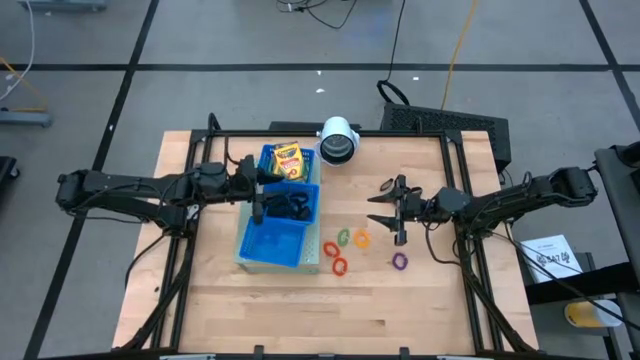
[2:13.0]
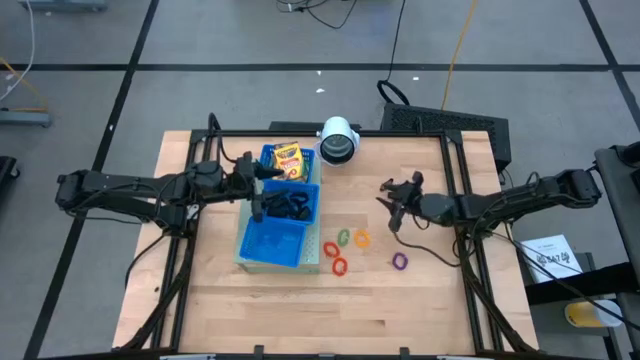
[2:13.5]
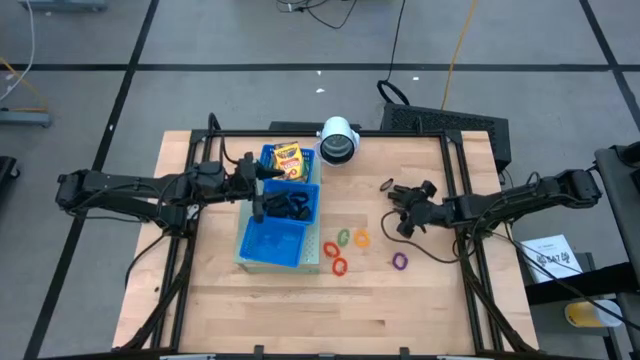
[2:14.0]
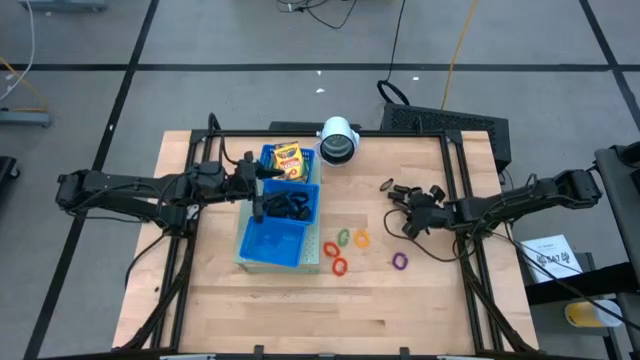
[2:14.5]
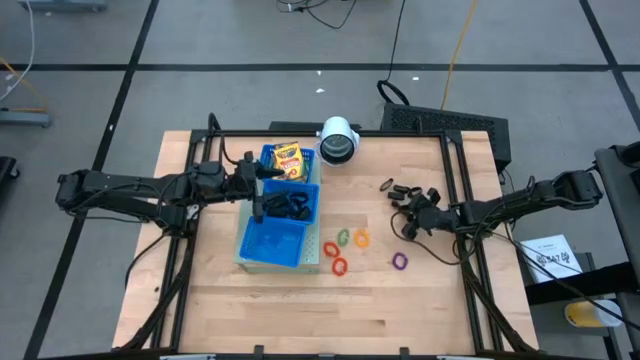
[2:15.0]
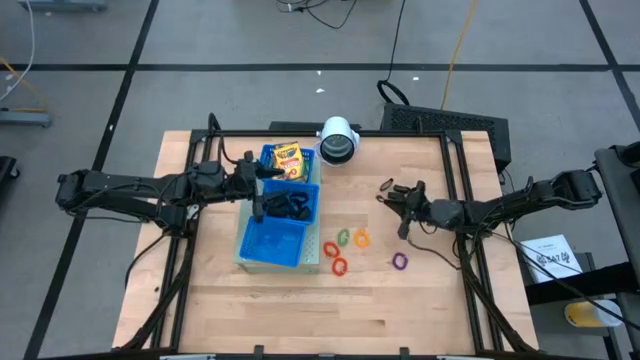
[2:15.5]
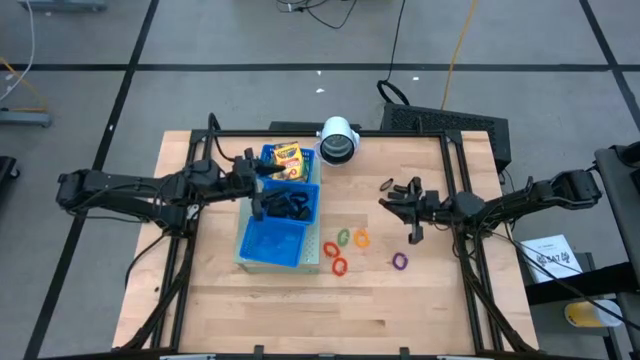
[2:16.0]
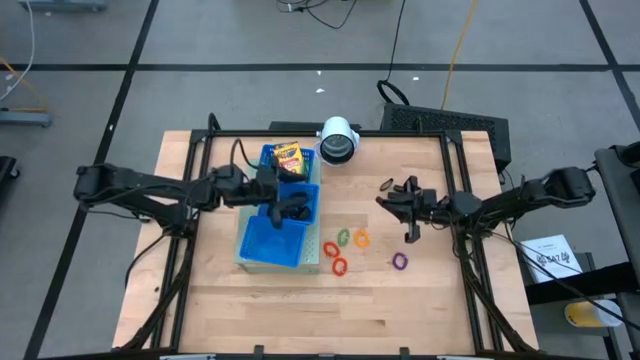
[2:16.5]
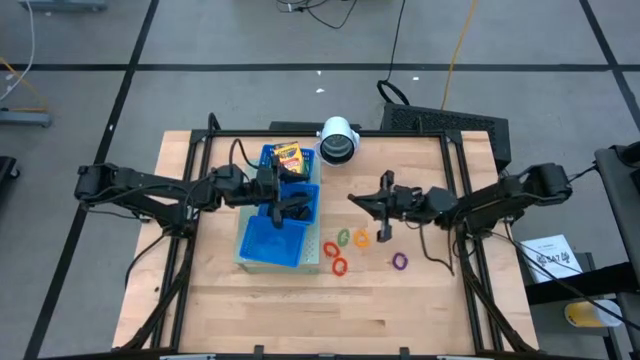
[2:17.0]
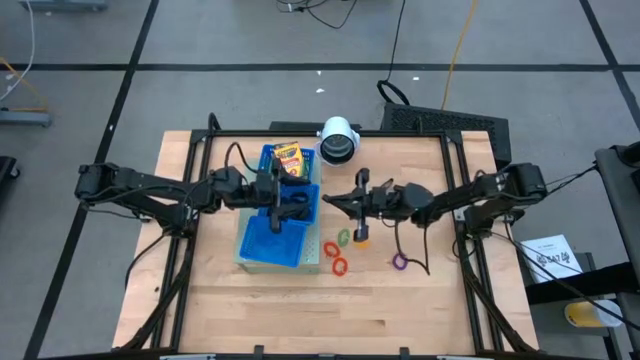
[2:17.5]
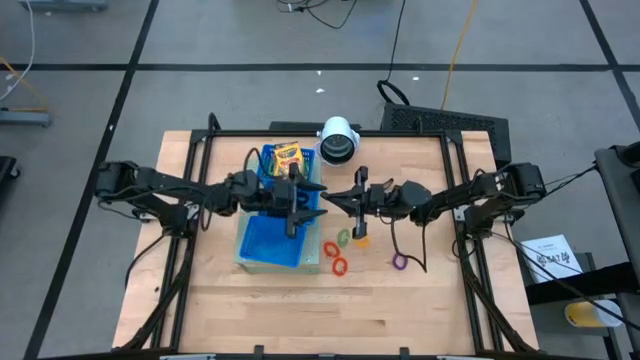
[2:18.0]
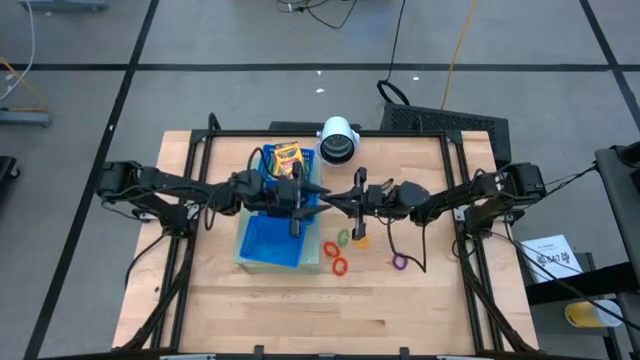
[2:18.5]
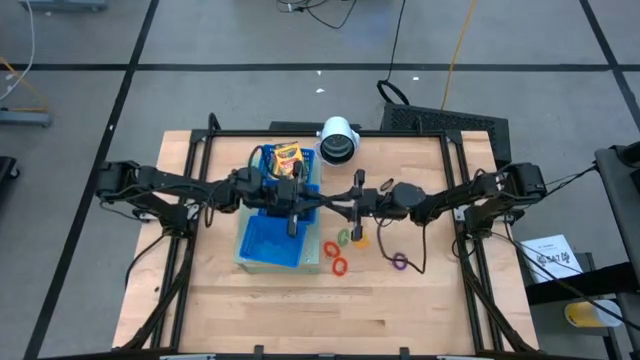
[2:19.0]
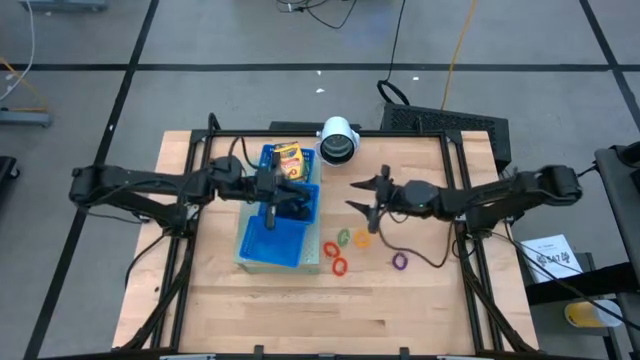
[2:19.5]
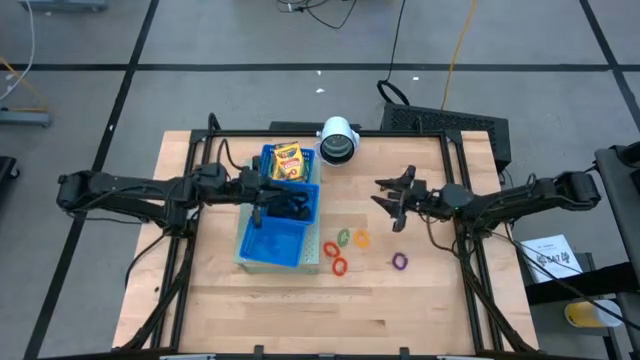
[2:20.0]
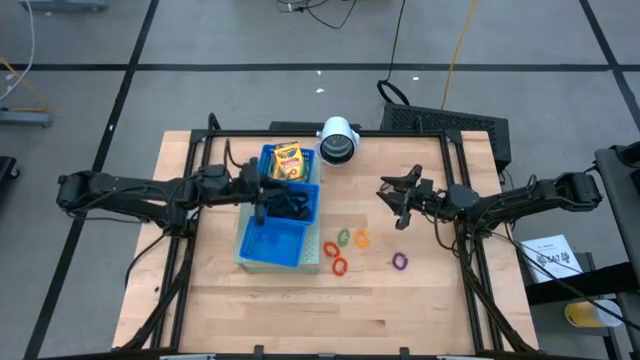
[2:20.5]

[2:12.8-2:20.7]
Task: Pick & Place Office Desk Supplies
Put the black rubber band into the middle blue bin on the shelf

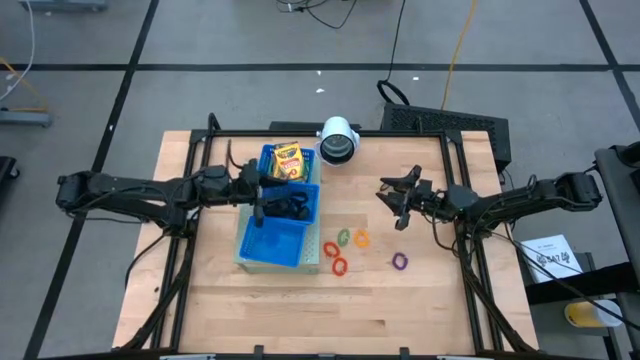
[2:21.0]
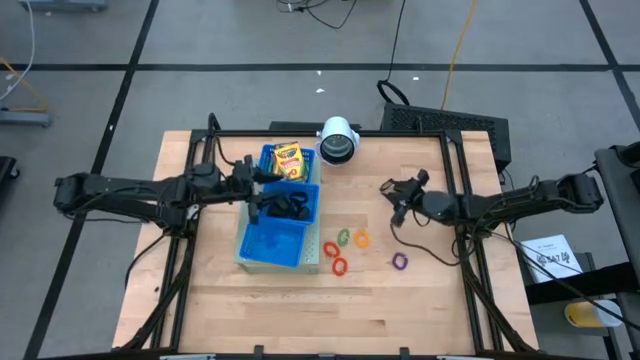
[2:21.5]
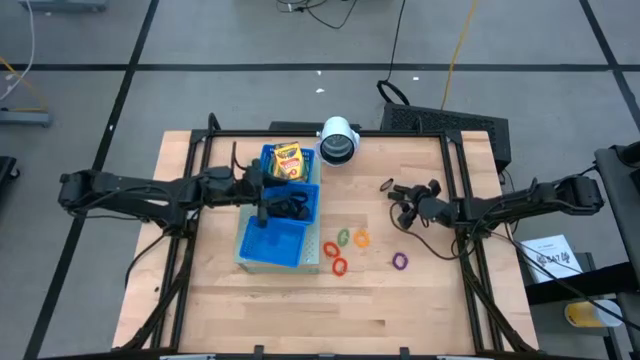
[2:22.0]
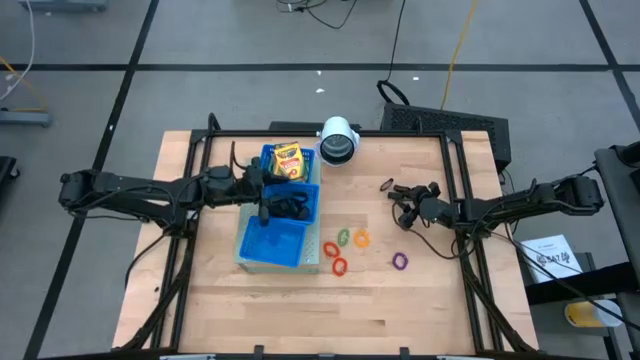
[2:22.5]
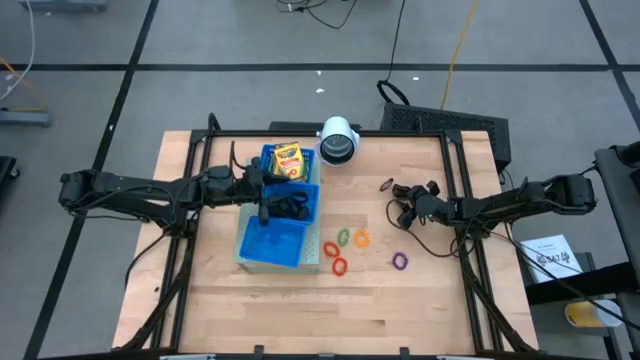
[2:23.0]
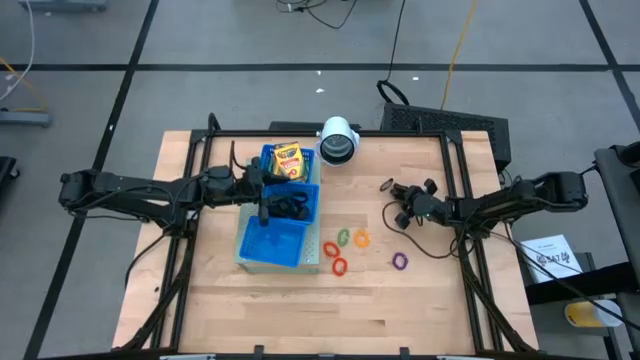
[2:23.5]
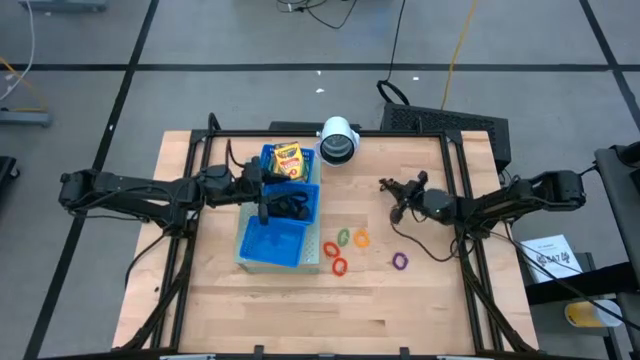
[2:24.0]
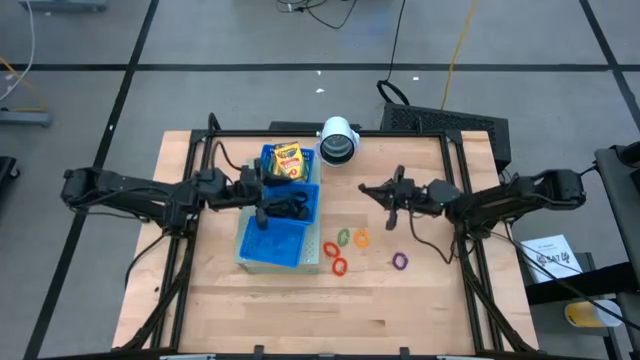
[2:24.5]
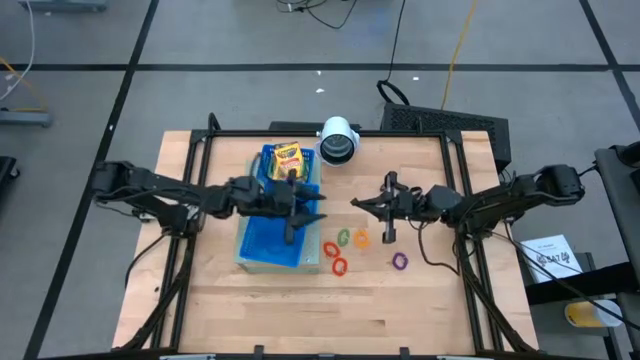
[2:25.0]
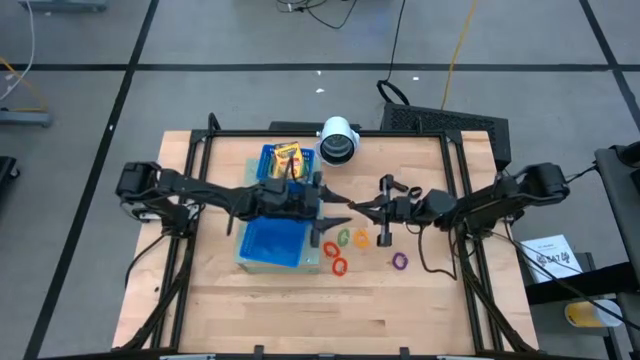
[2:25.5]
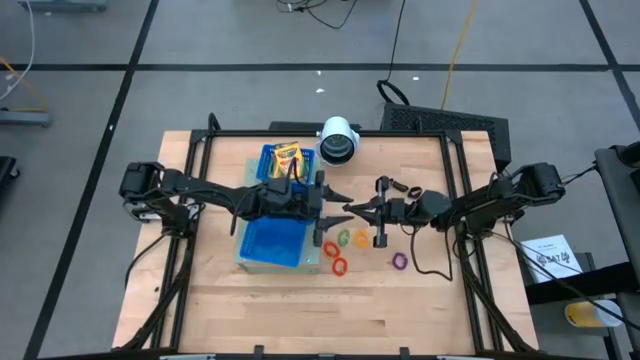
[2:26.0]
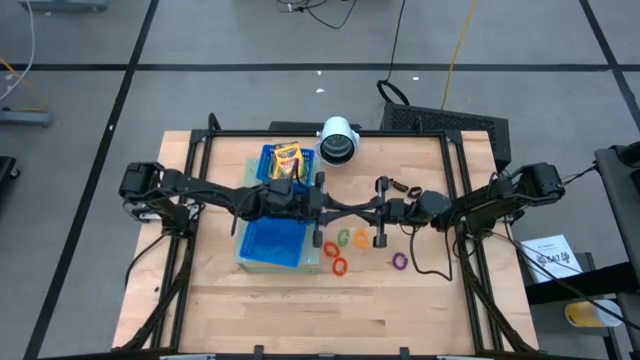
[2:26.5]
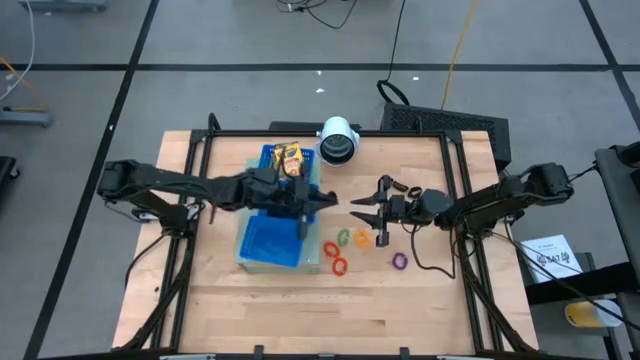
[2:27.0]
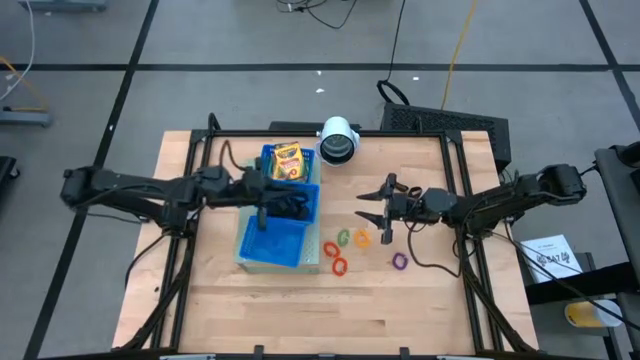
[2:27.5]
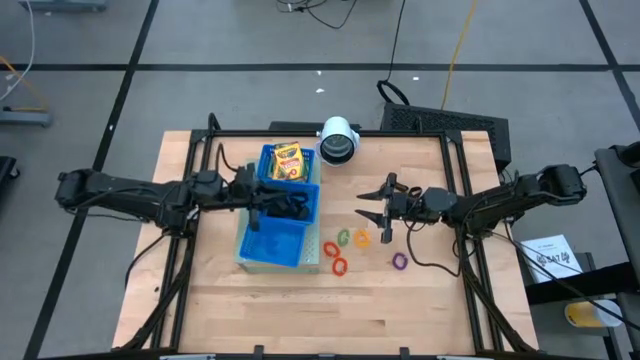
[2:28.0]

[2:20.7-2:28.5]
Put the black rubber band into the middle blue bin on the shelf

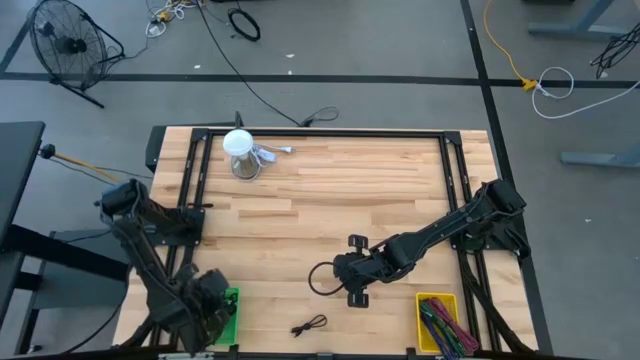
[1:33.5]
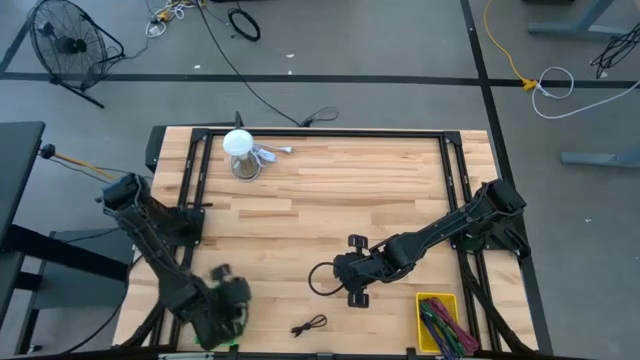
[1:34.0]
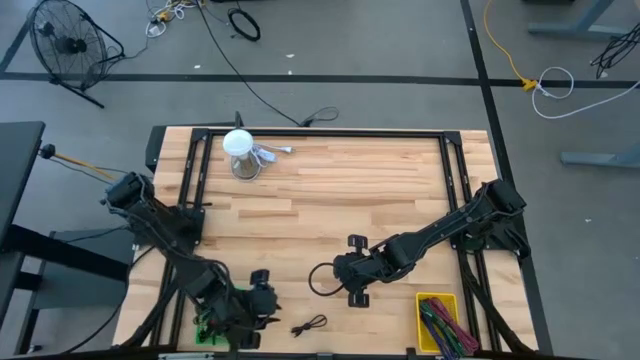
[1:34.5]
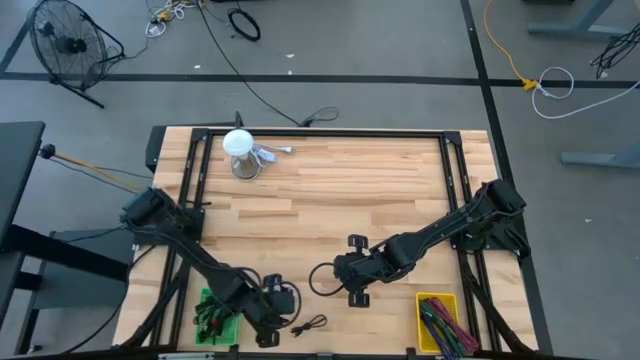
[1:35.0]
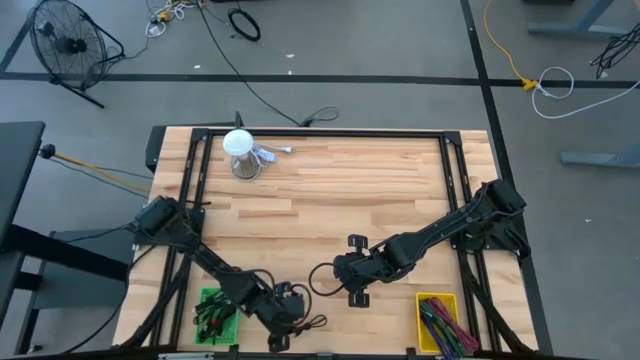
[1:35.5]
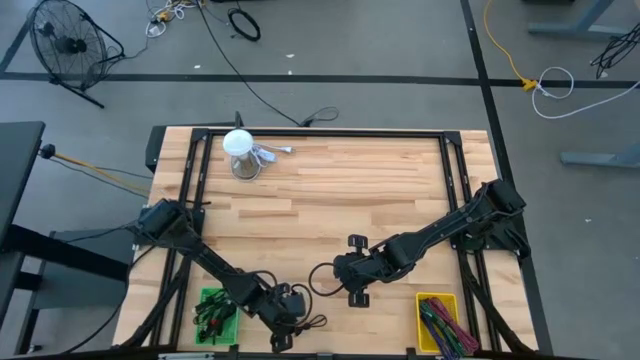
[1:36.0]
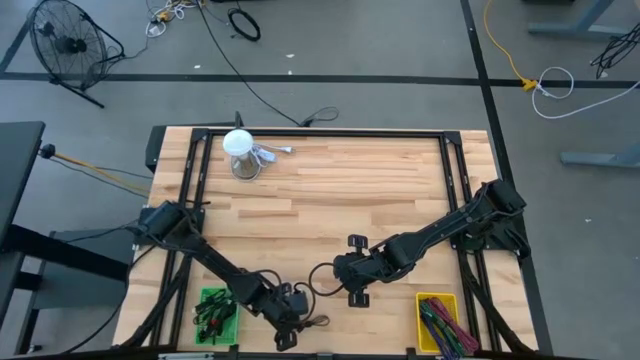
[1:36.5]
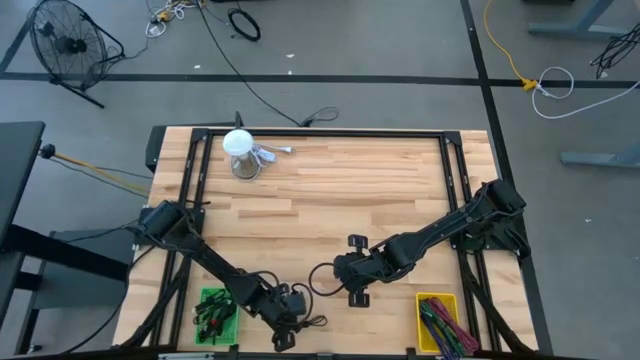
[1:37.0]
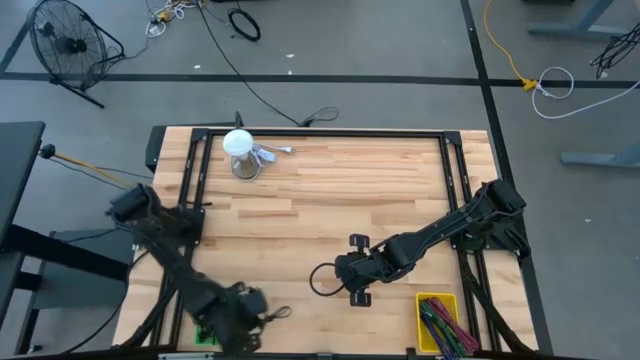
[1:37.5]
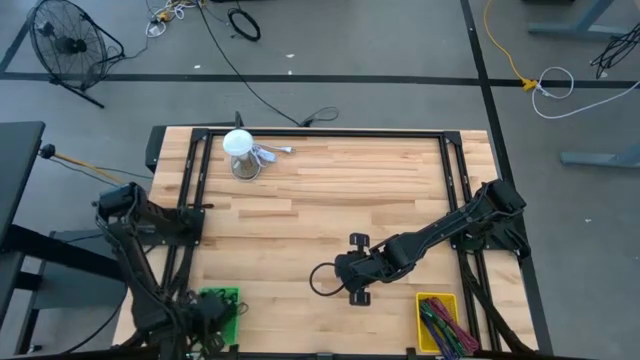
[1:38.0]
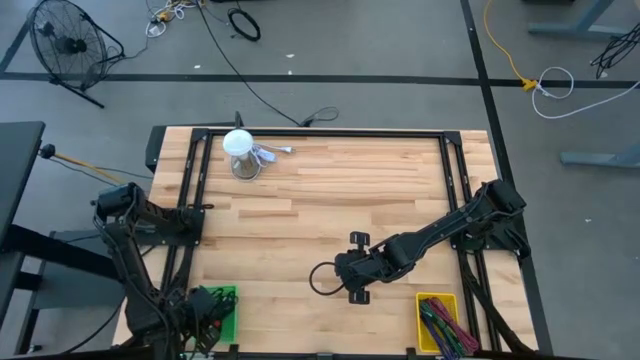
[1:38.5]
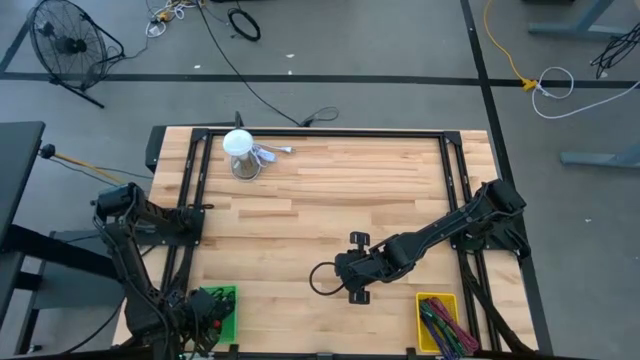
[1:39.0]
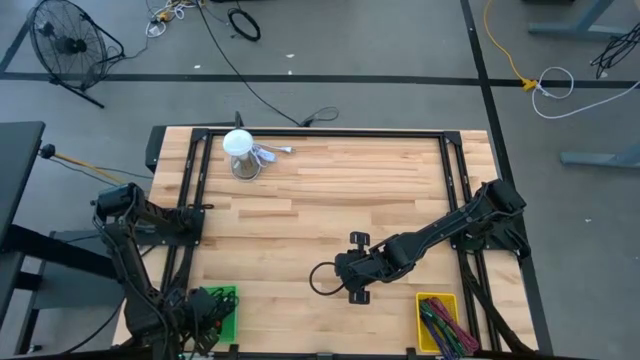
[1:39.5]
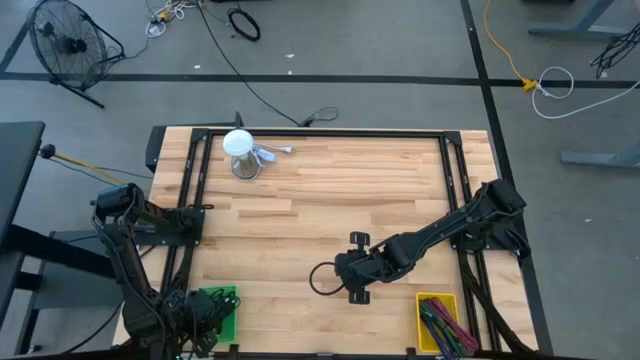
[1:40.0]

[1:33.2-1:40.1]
Task: Pick & Place USB Port
Put the black charger cable into the green bin
